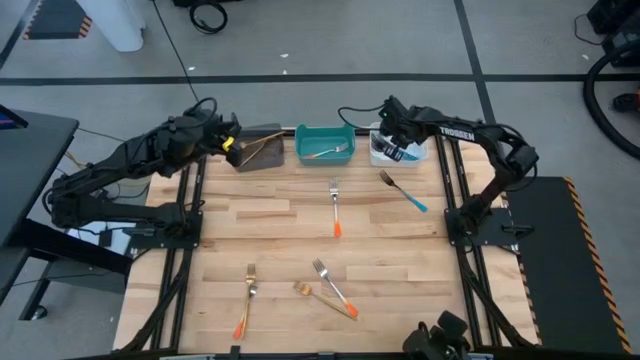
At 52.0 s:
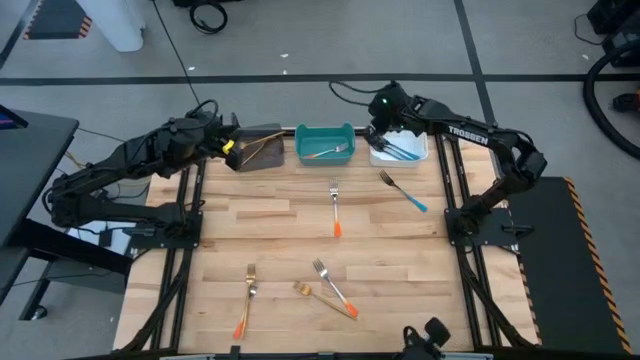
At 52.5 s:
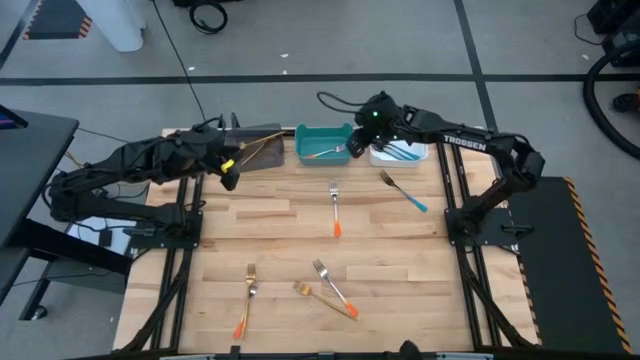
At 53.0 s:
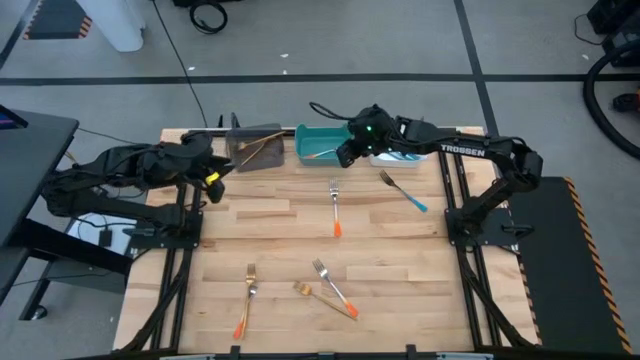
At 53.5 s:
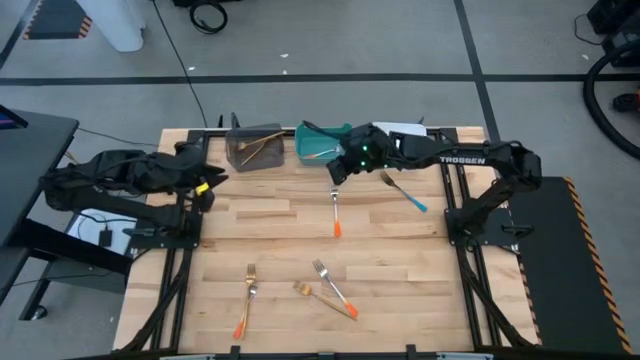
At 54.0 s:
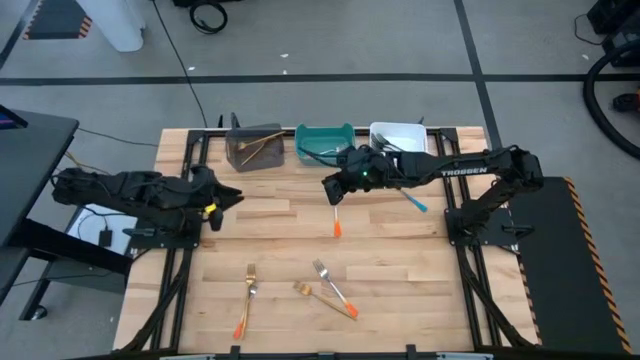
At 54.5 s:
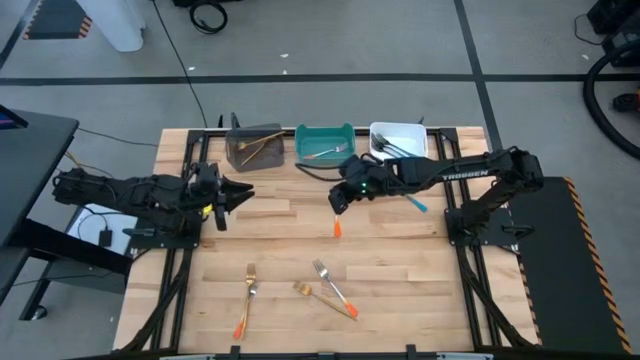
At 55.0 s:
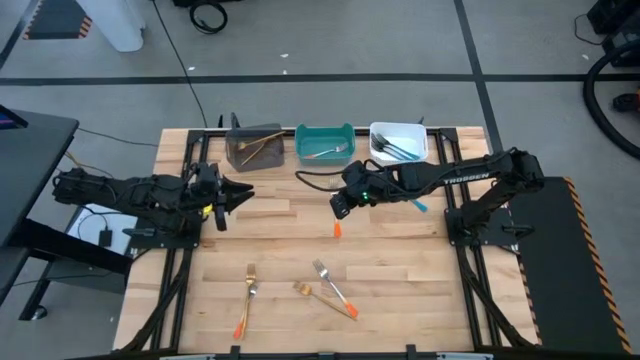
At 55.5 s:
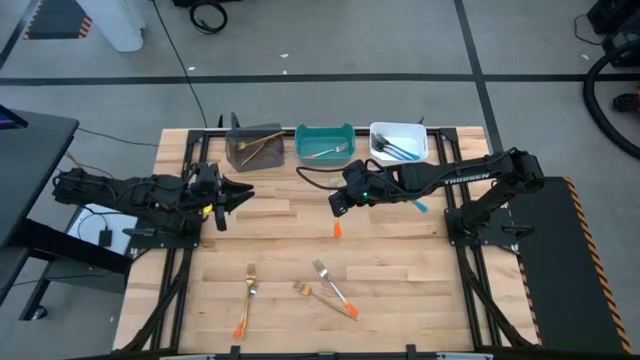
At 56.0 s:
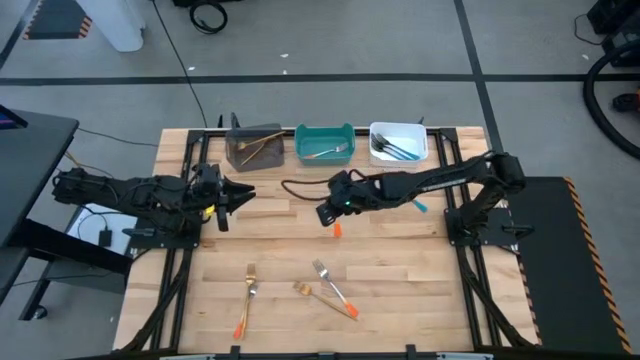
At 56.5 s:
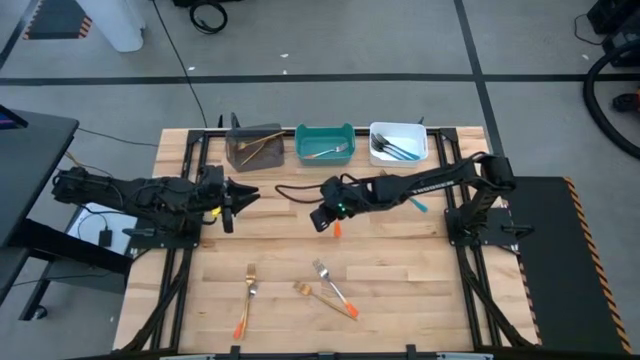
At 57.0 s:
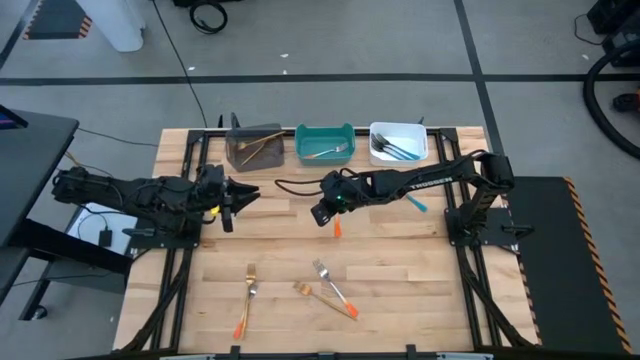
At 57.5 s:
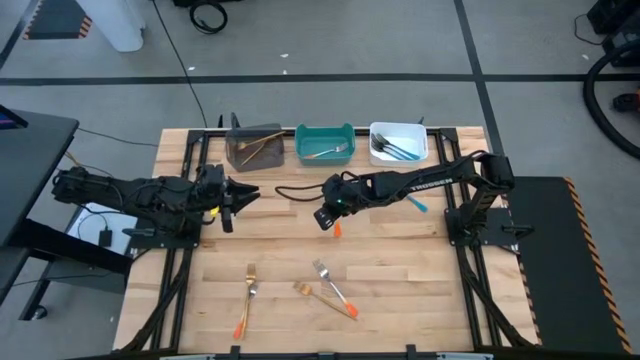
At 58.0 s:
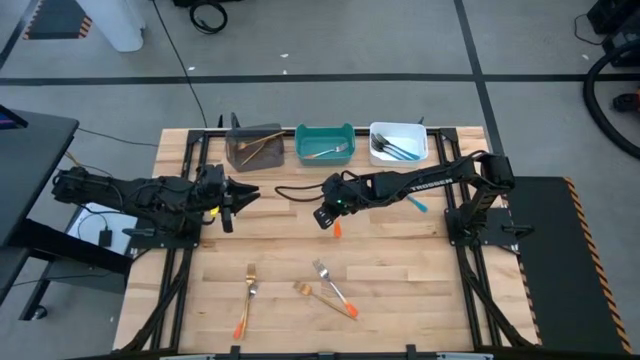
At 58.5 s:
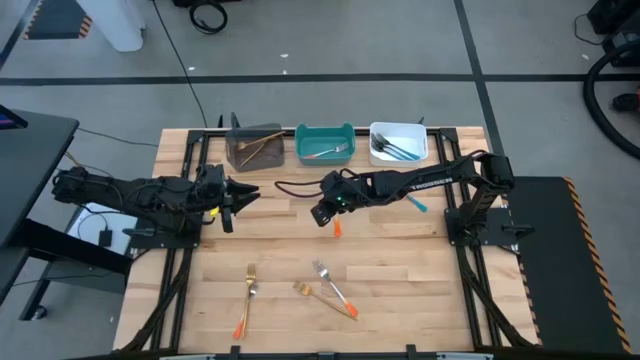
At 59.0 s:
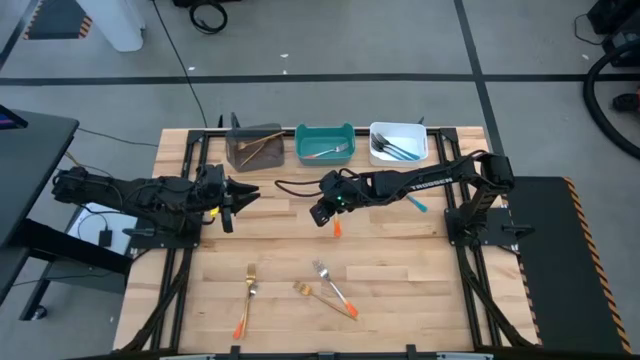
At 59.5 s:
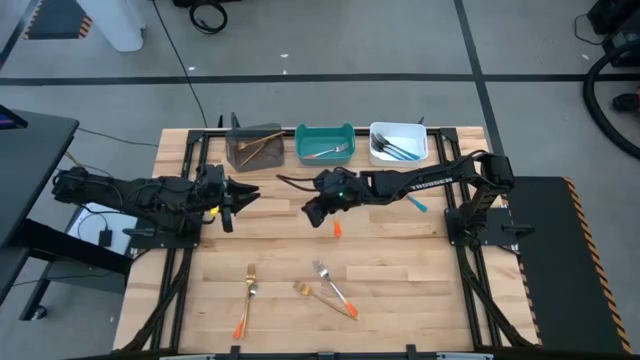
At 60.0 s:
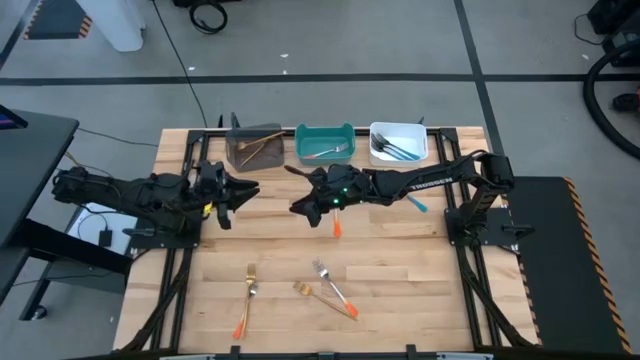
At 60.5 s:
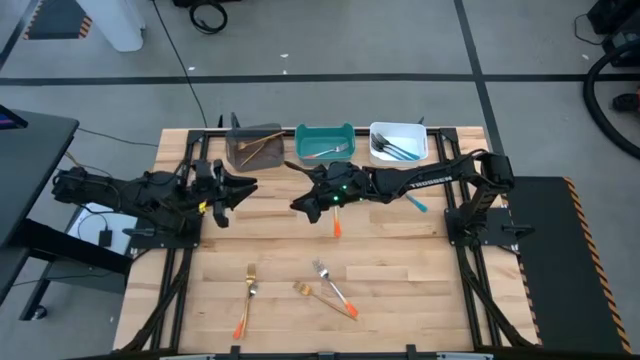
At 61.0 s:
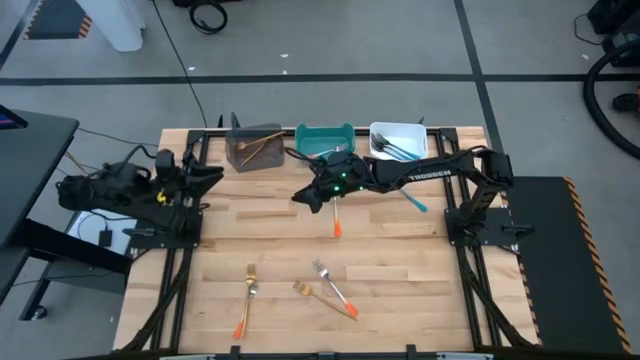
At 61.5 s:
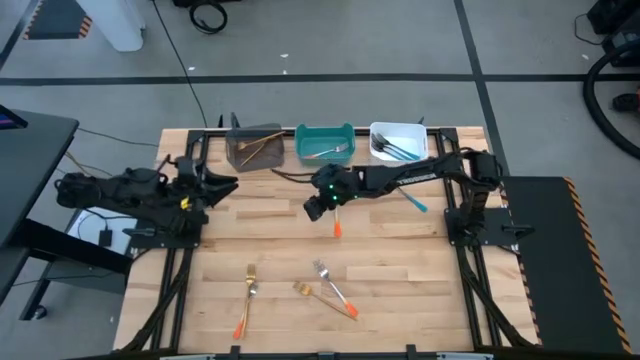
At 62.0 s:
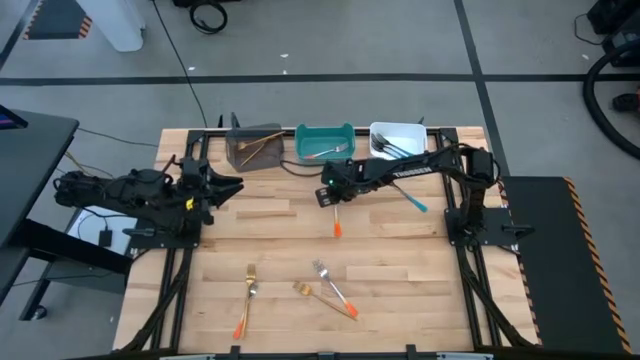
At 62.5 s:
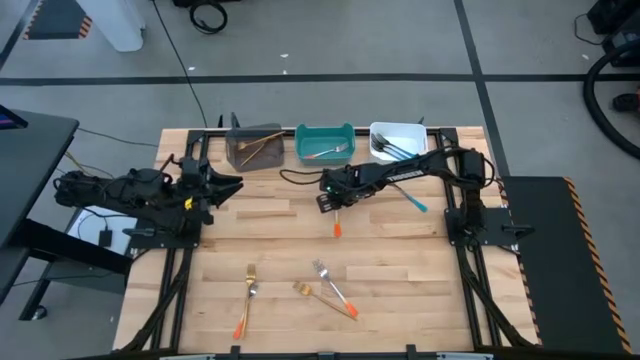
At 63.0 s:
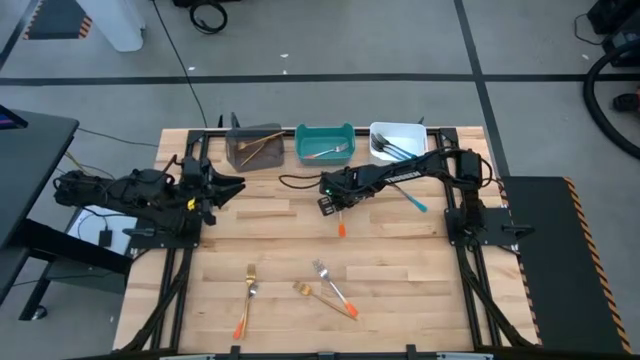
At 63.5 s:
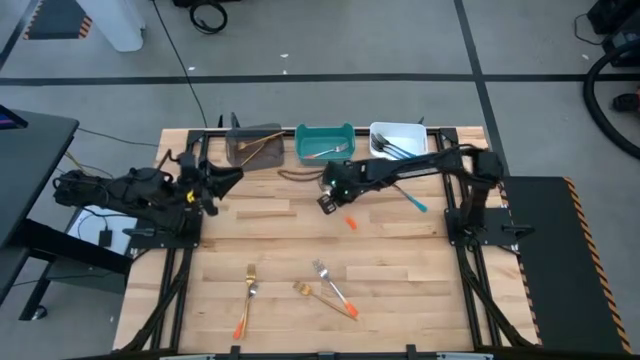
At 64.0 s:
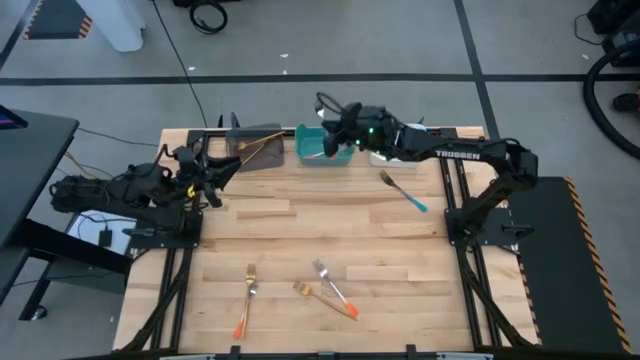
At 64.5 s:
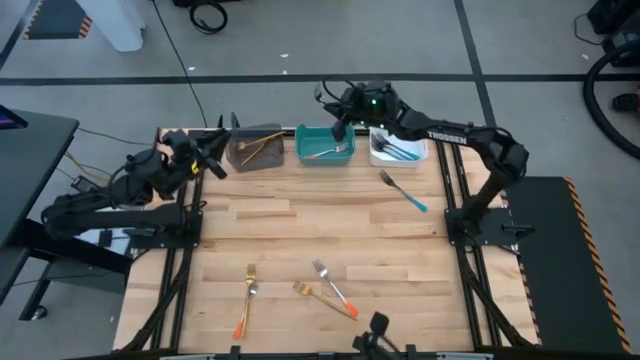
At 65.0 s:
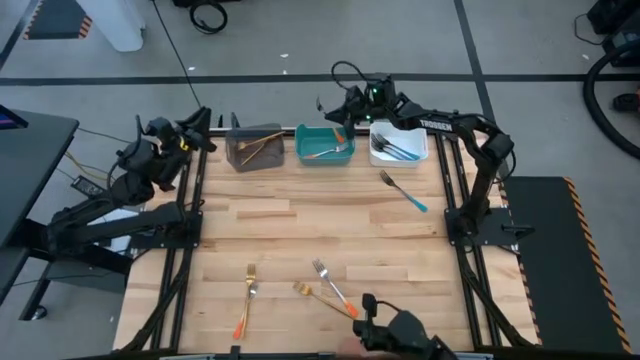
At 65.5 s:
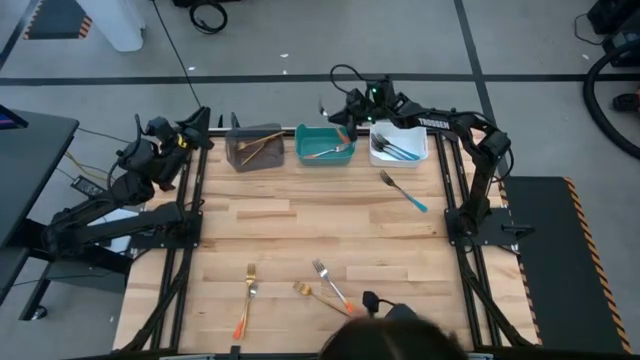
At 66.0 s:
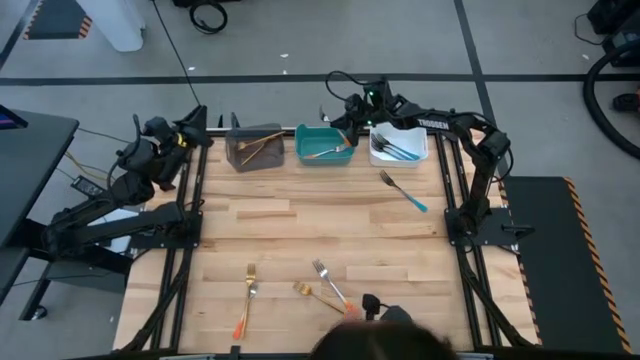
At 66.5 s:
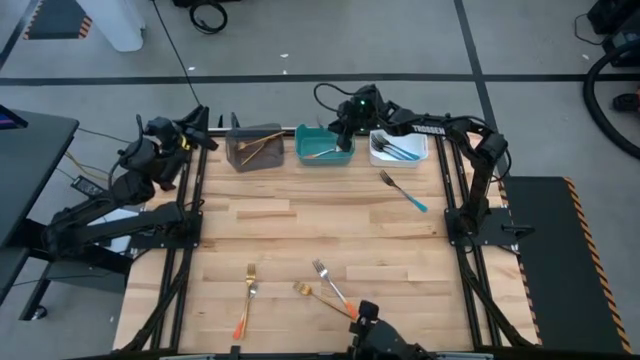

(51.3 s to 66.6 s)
Task: Sort silverware by color (type)
Put the orange fork into the blue bin

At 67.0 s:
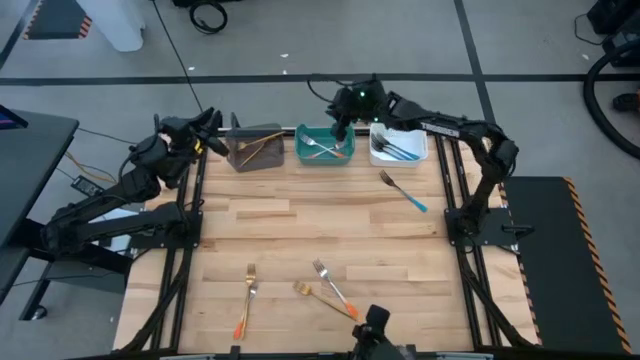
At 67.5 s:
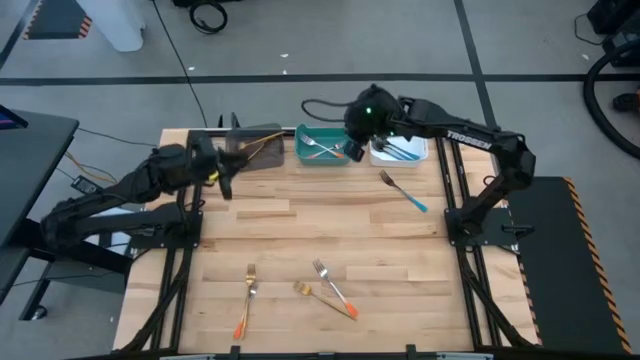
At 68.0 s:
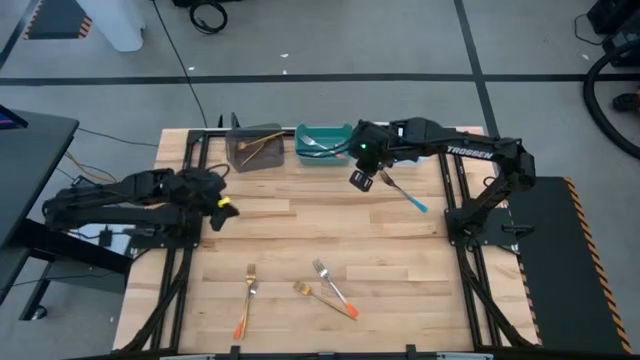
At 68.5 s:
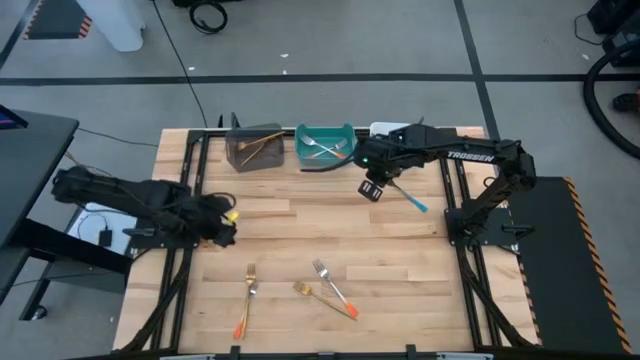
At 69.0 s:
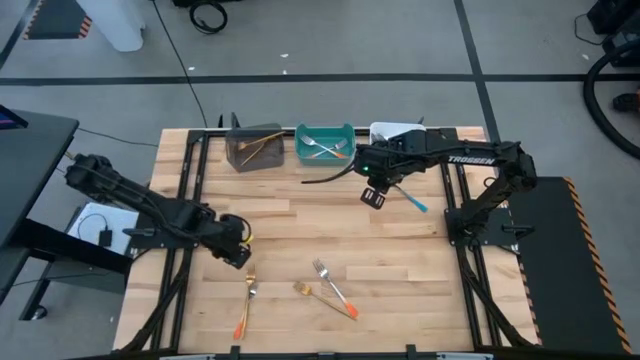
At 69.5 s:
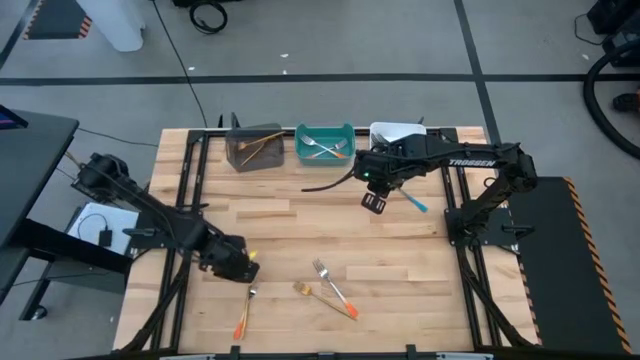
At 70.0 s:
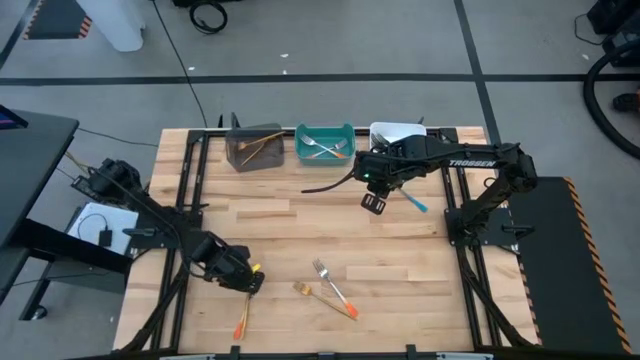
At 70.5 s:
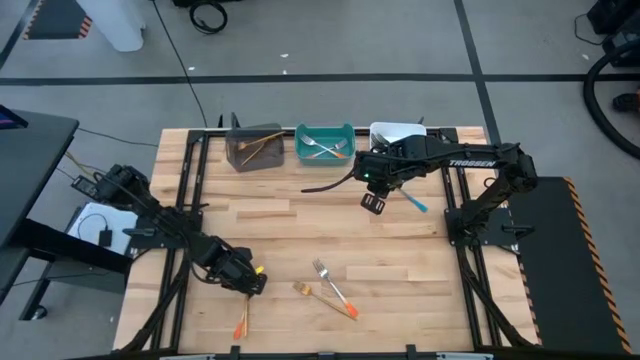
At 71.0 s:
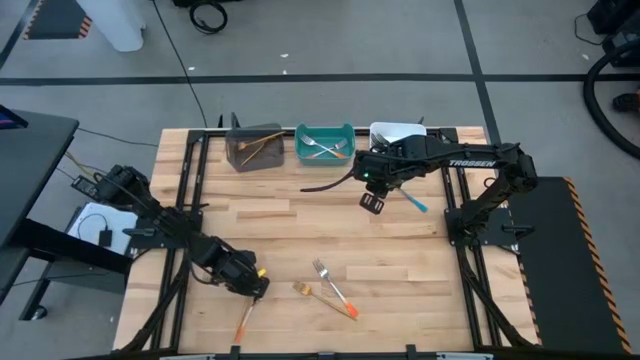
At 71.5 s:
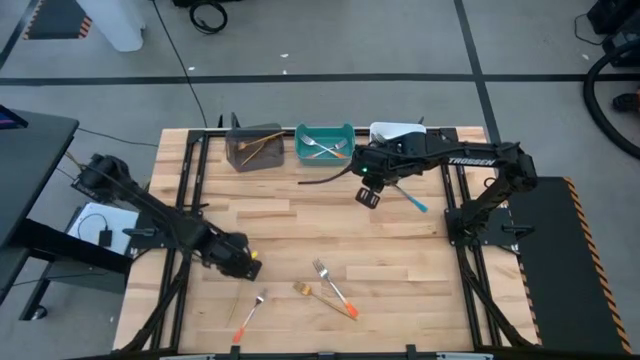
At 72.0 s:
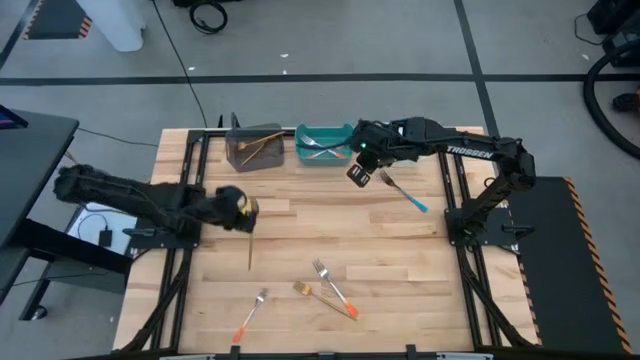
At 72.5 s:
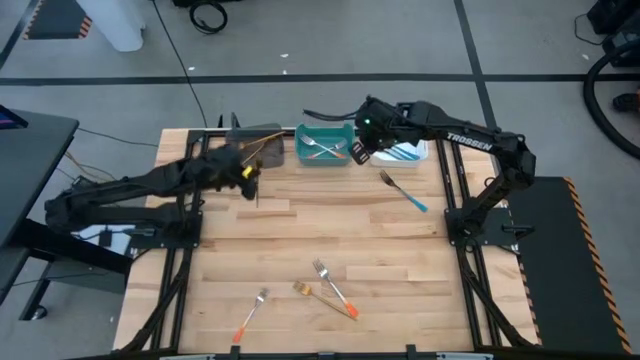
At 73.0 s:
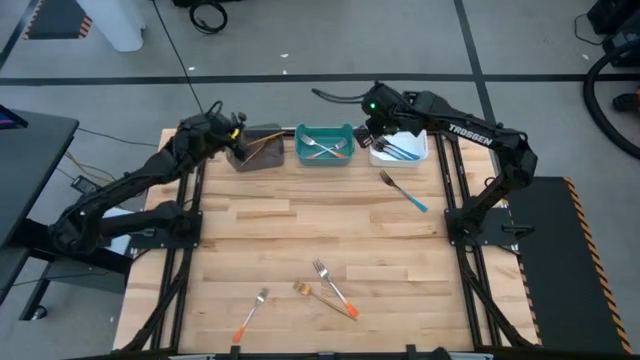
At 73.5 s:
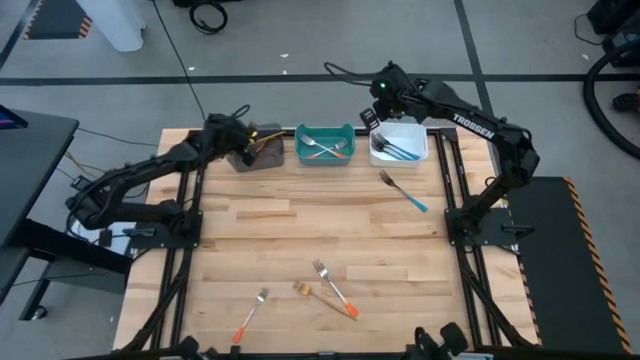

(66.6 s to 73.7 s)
Put the gold fork into the black bin
